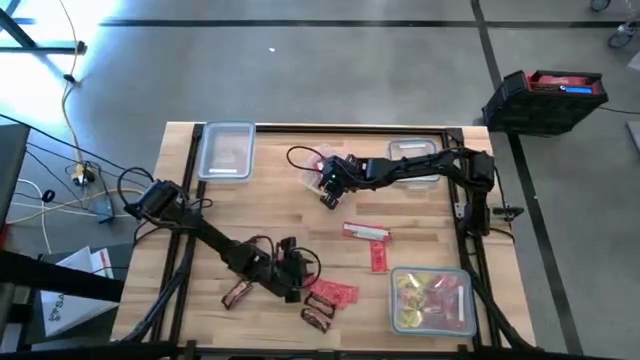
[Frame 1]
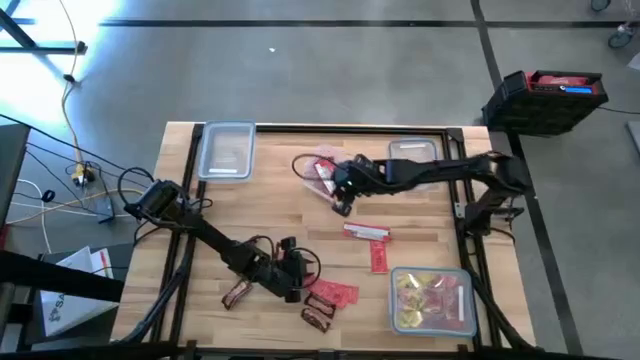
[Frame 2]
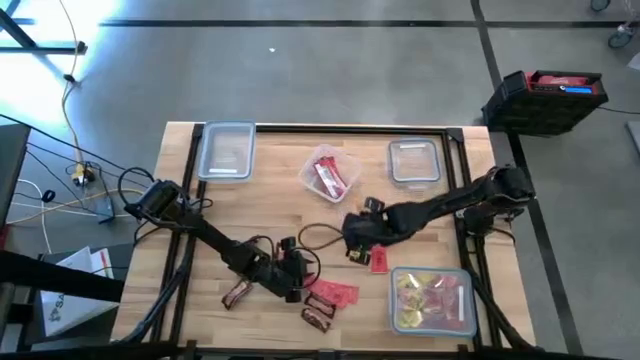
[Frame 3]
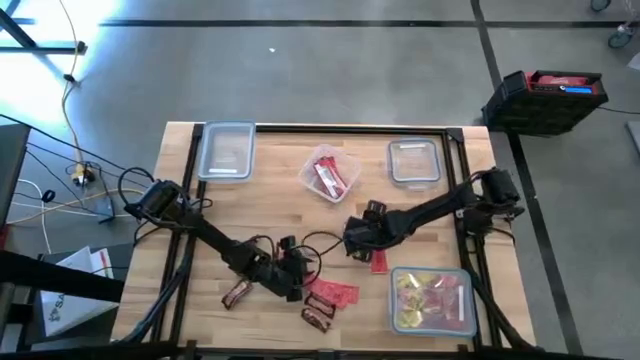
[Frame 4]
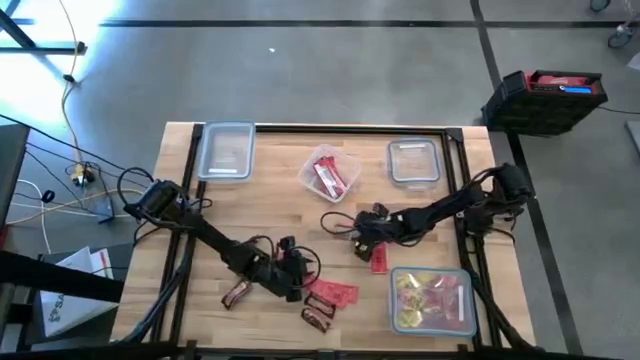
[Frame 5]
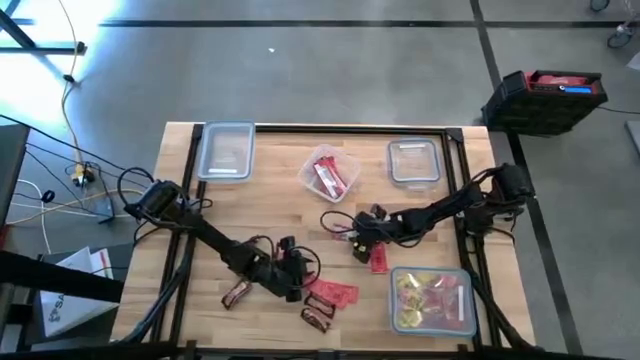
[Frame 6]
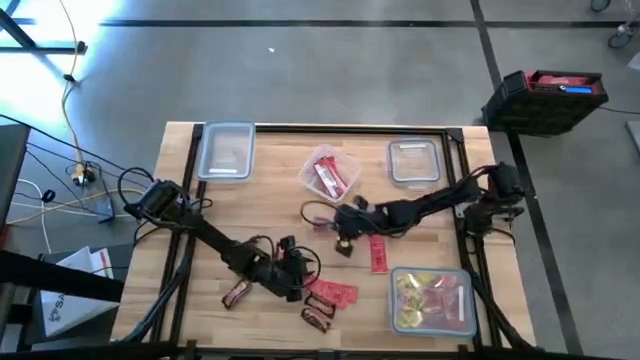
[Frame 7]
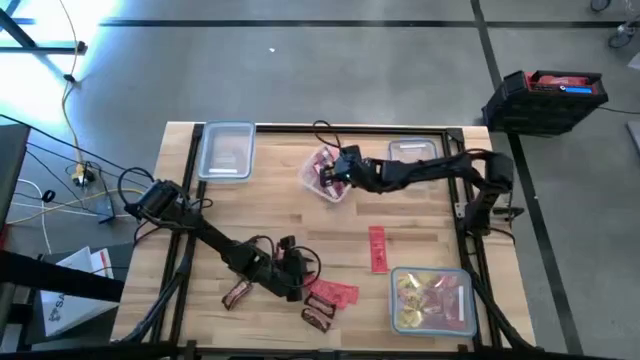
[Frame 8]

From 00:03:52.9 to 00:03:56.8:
Task: Sort candy
Put the strawberry red into the upper middle transparent bin

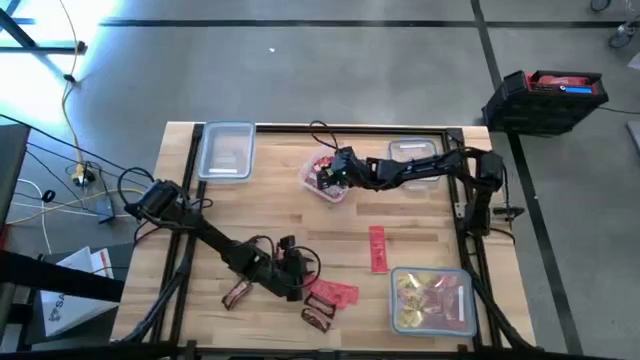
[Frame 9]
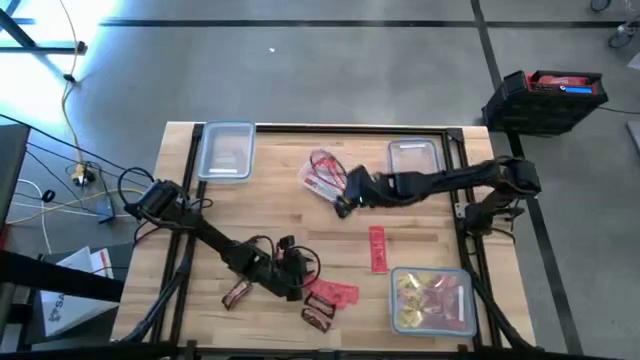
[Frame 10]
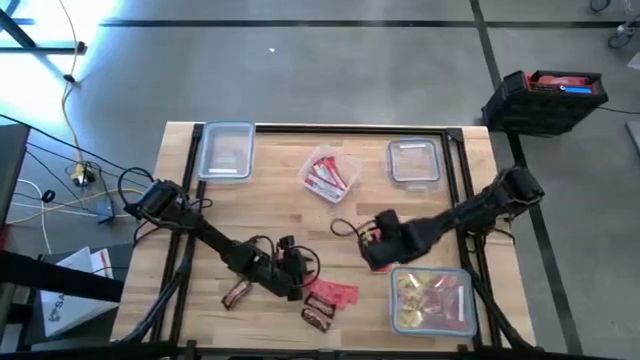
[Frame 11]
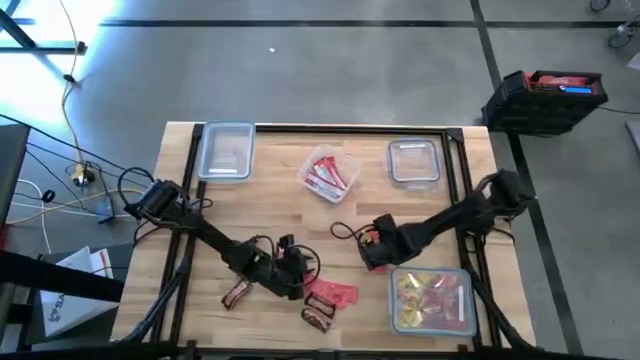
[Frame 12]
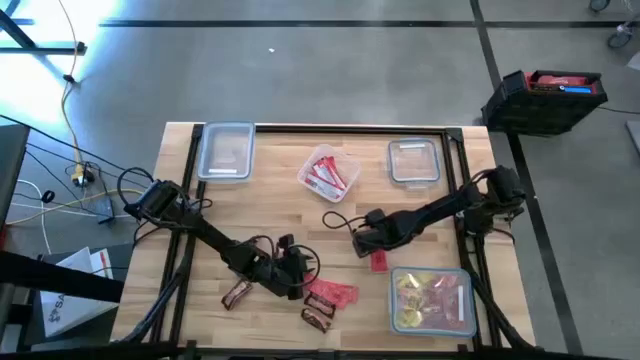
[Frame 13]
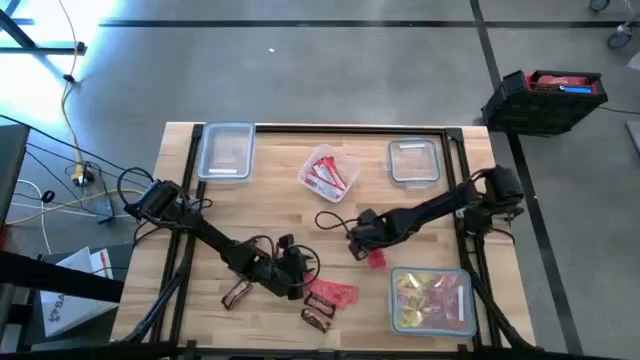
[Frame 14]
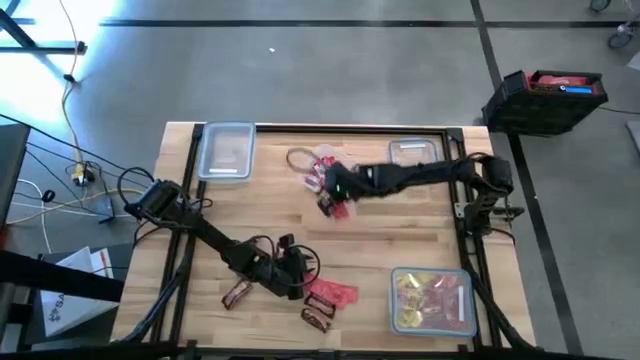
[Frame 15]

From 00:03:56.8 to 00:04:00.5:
Put the strawberry red into the upper middle transparent bin

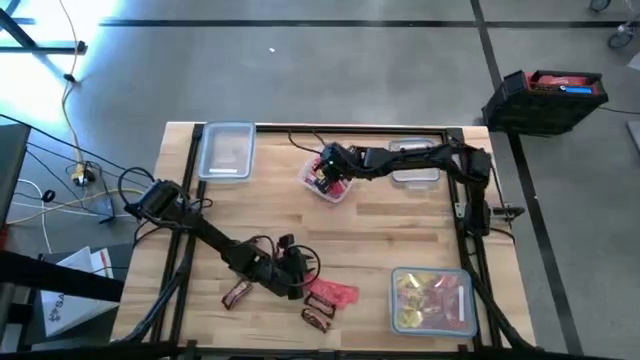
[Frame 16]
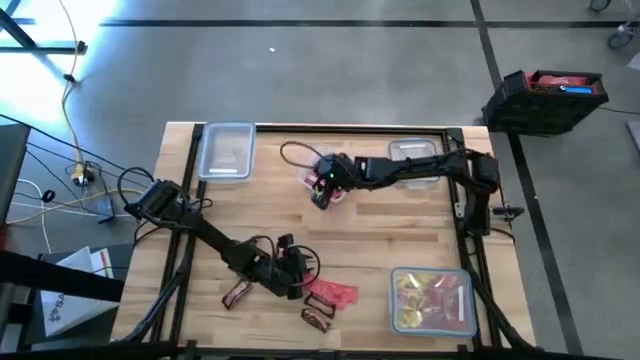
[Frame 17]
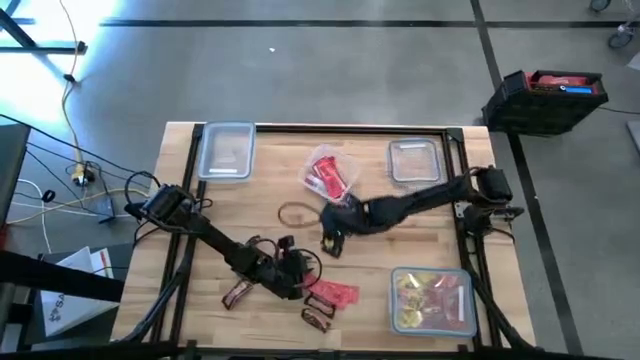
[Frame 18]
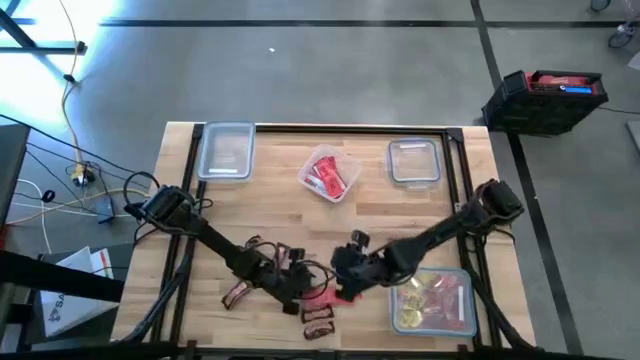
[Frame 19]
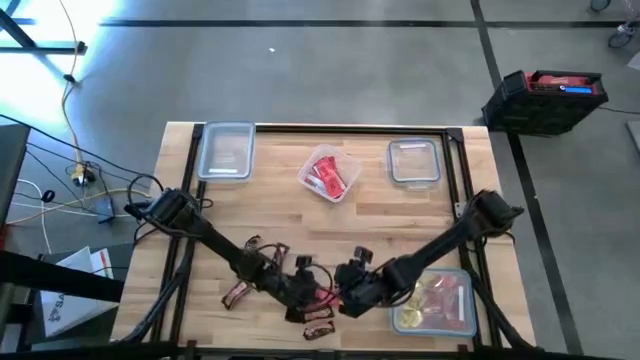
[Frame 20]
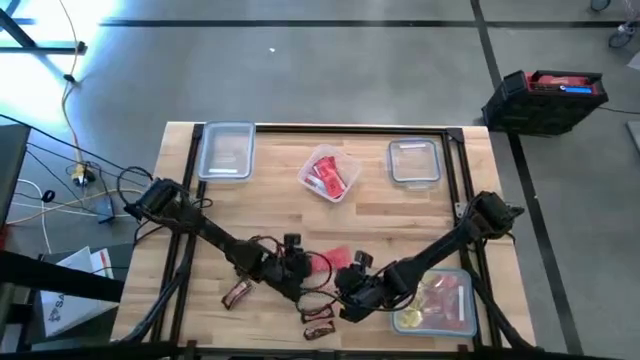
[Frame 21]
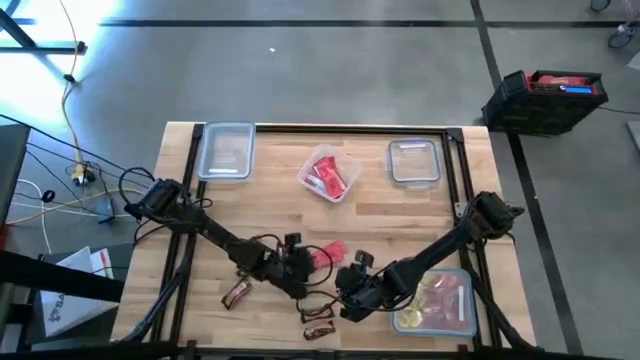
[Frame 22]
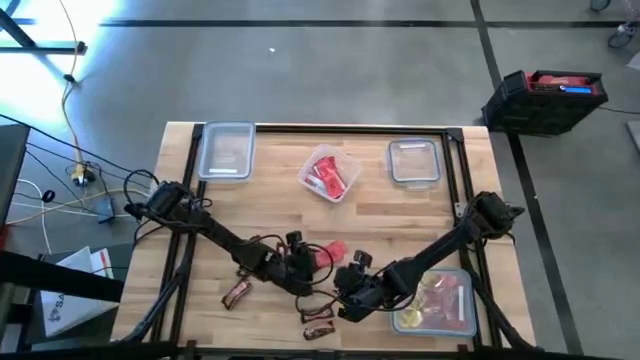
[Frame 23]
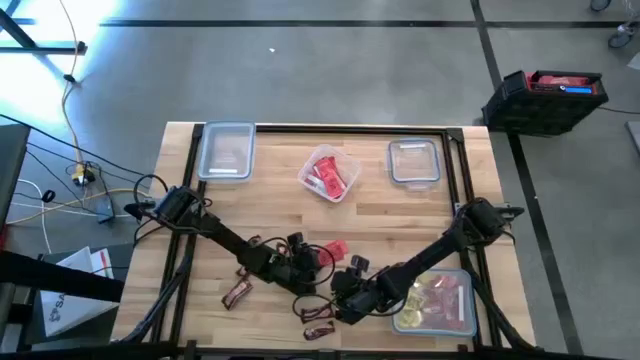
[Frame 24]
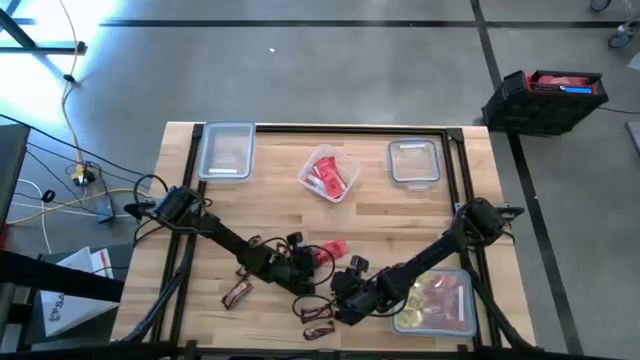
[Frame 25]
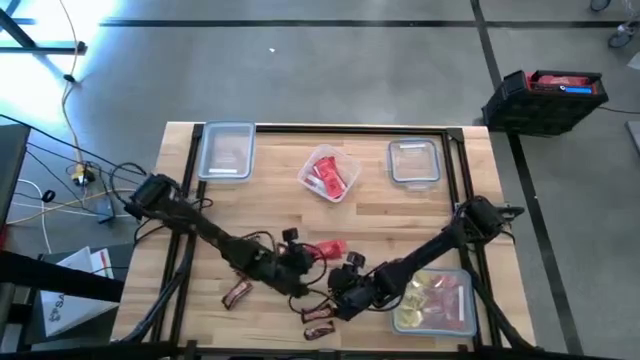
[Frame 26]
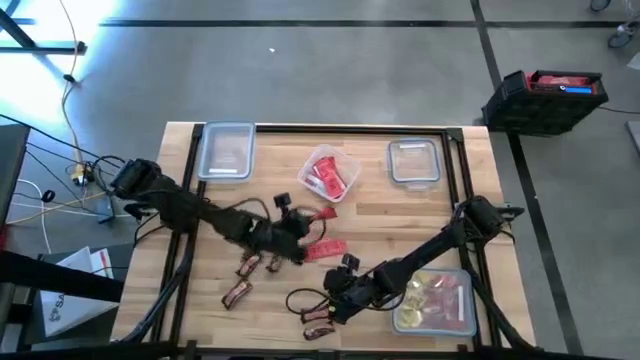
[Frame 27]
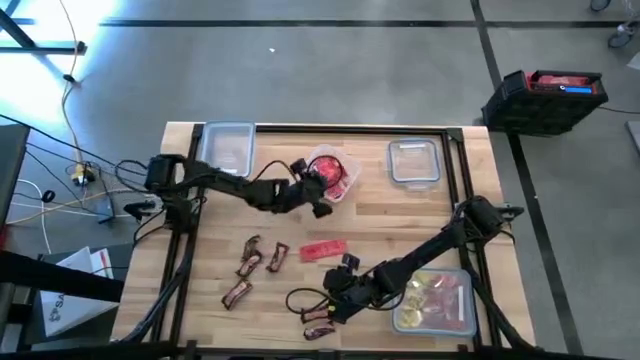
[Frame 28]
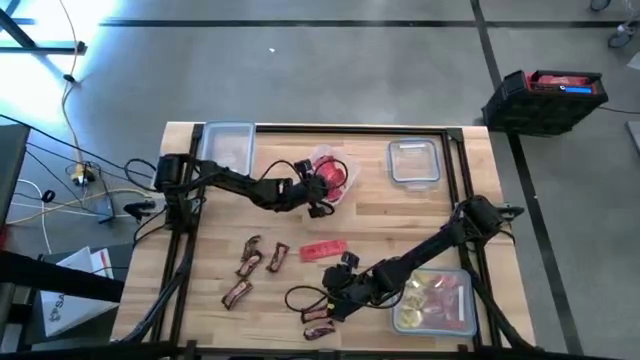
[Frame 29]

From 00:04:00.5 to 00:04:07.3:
Put the middle right strawberry red into upper middle transparent bin

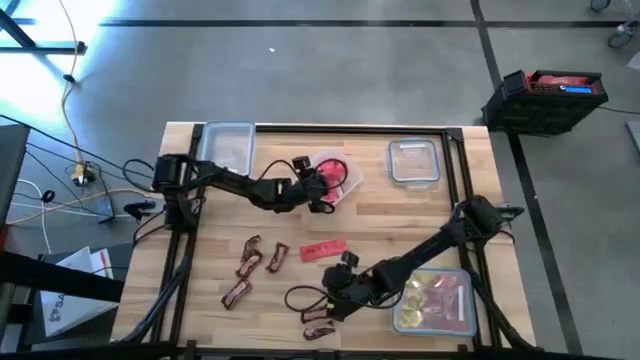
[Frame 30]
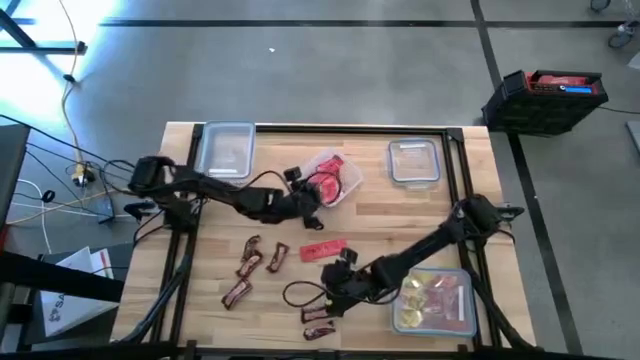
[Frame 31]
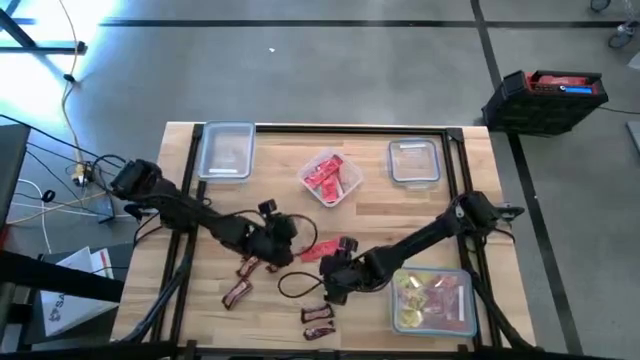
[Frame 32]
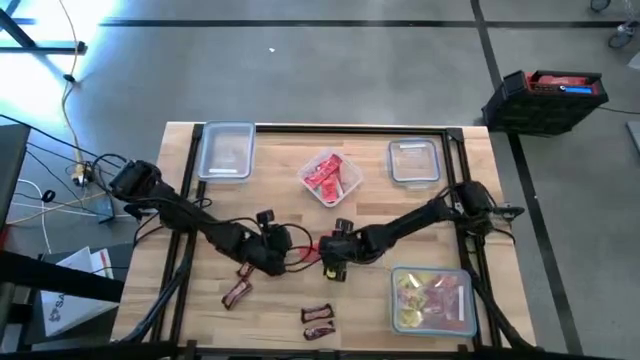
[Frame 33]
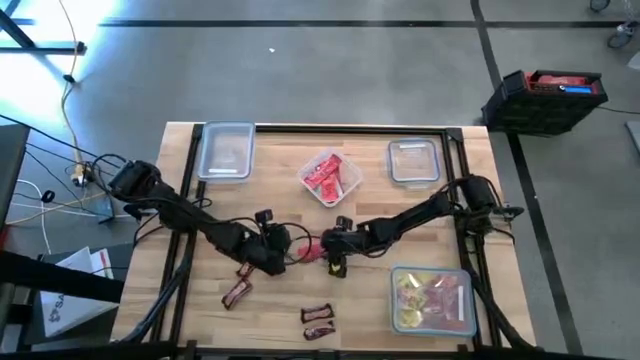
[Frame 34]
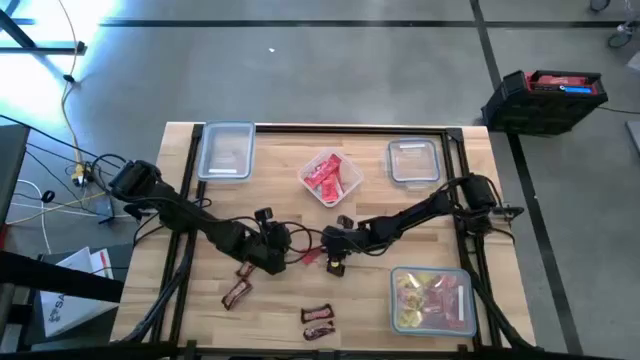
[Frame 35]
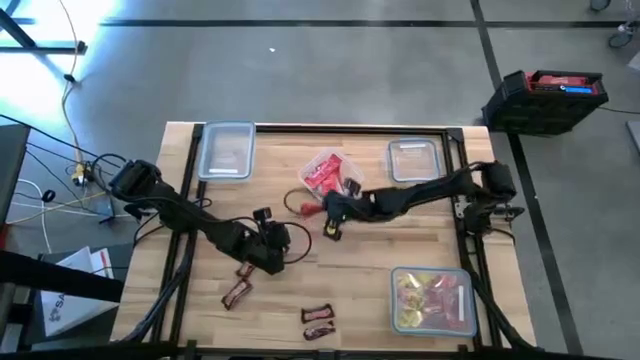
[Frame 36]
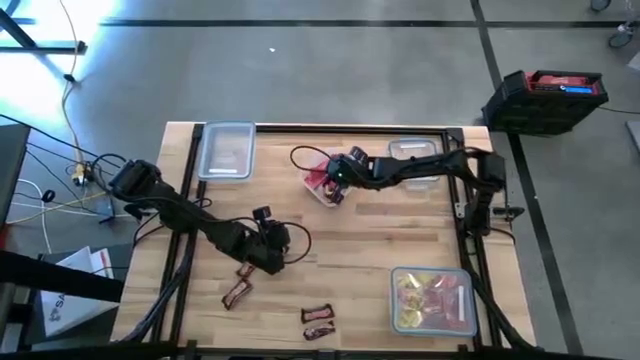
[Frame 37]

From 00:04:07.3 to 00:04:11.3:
Put the strawberry red into the upper middle transparent bin

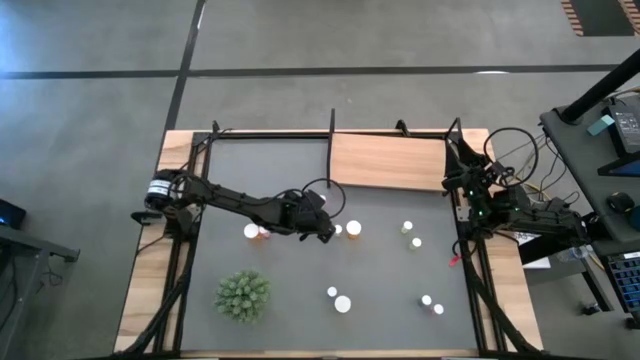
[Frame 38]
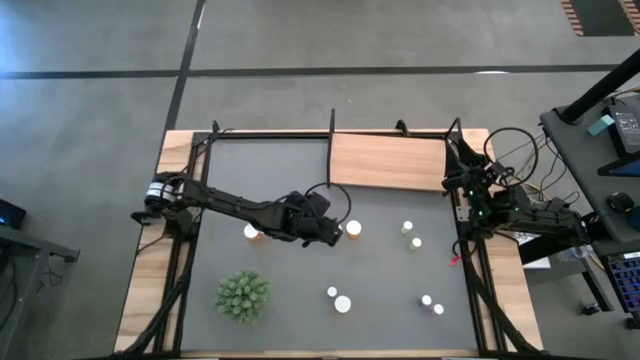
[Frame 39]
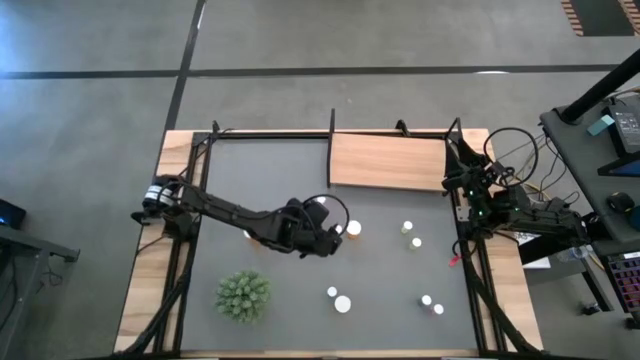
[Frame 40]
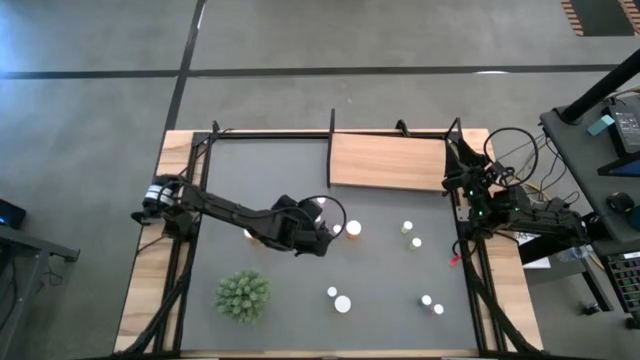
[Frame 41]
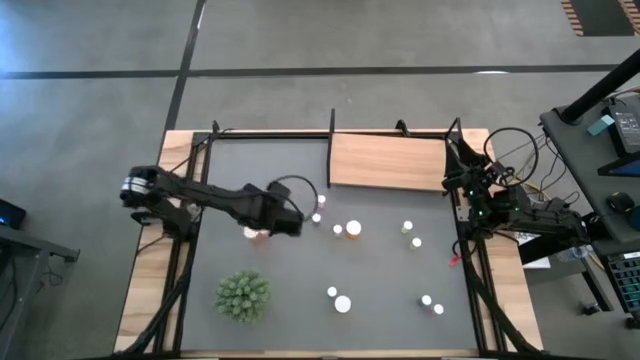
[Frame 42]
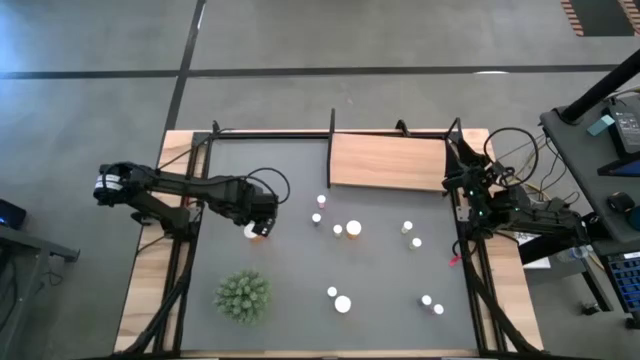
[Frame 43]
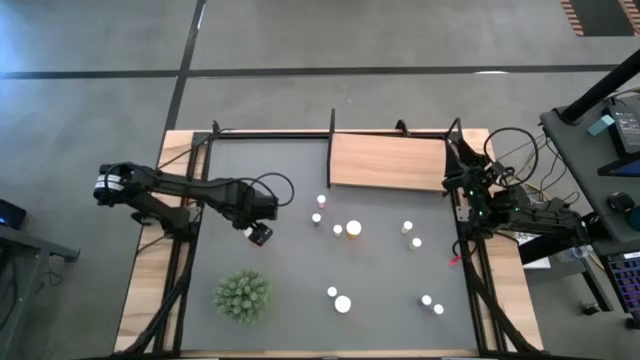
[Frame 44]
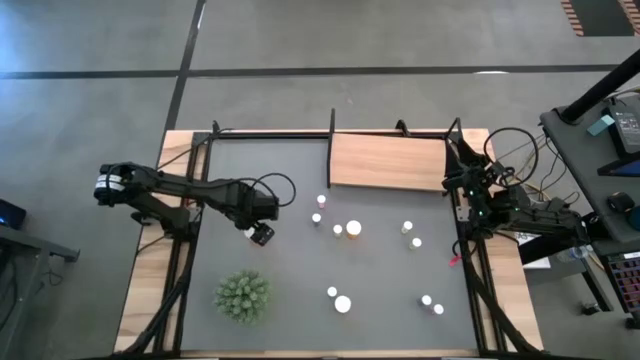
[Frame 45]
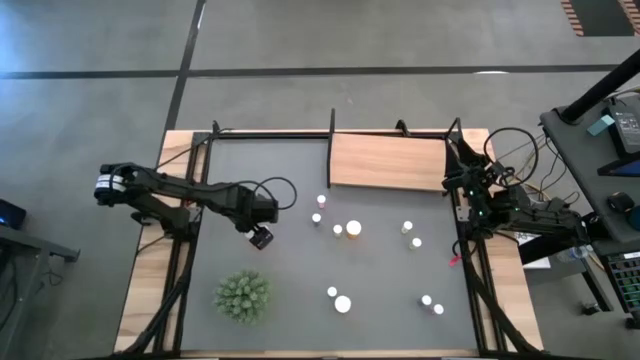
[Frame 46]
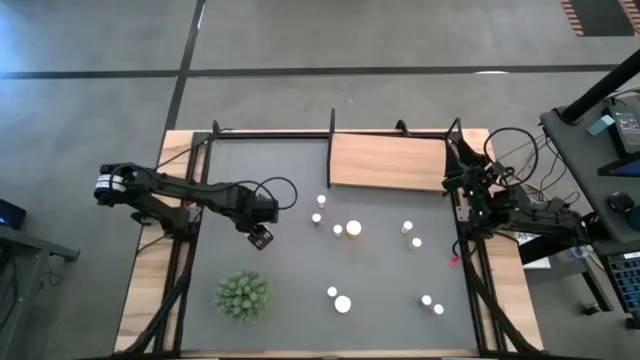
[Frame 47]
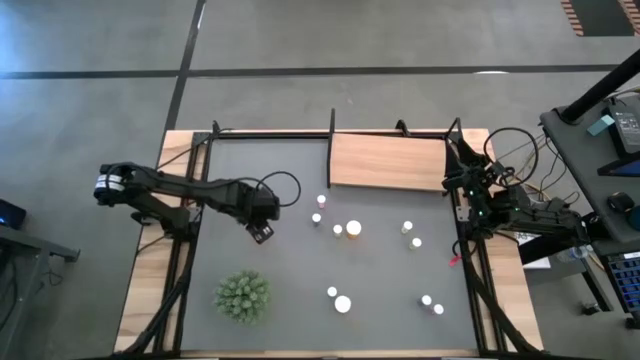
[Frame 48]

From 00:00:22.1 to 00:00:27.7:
Task: Pick and place medicine bottles onto shelf by color
Put the left orange pill bottle on the shelf
